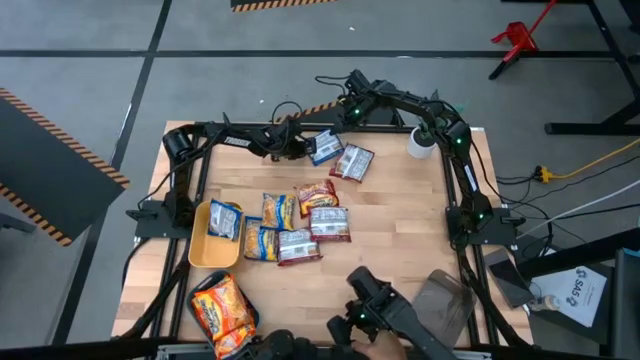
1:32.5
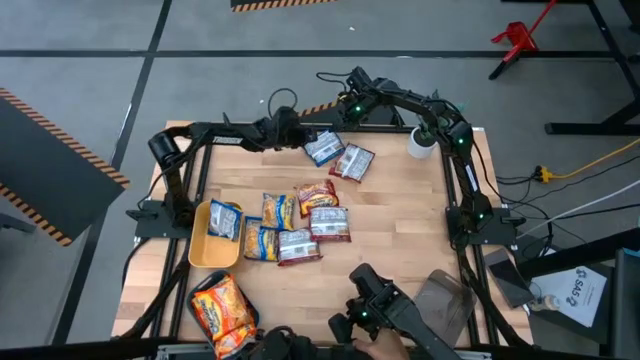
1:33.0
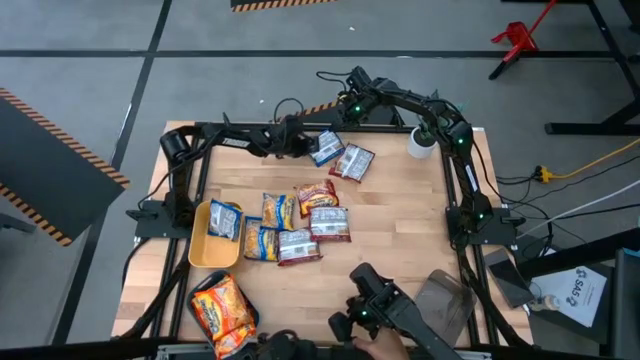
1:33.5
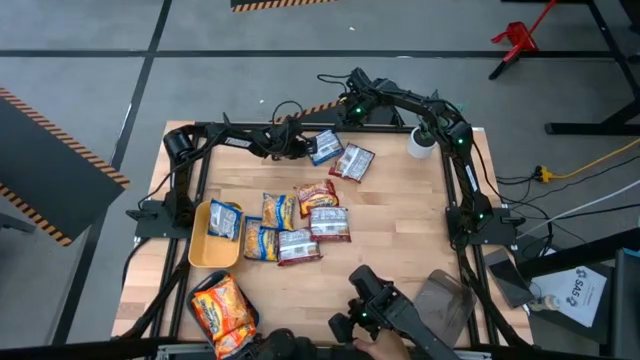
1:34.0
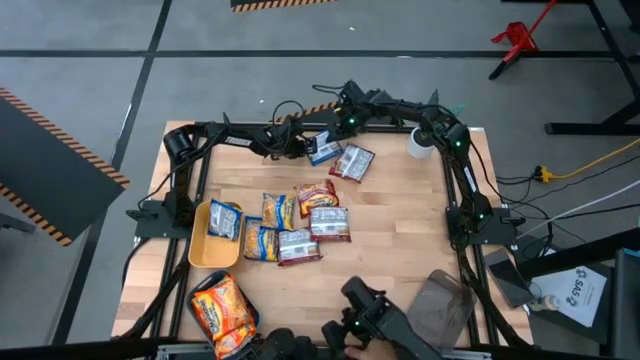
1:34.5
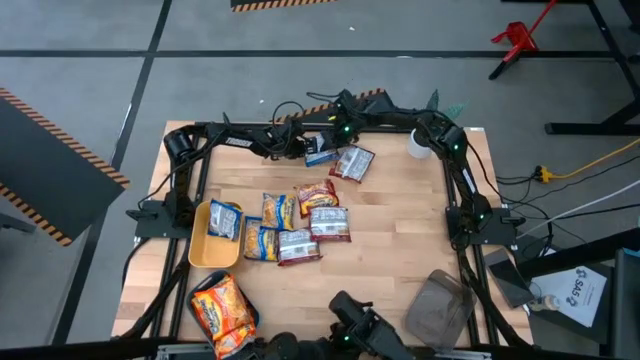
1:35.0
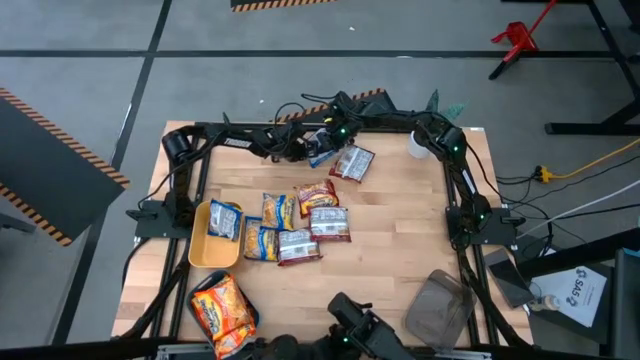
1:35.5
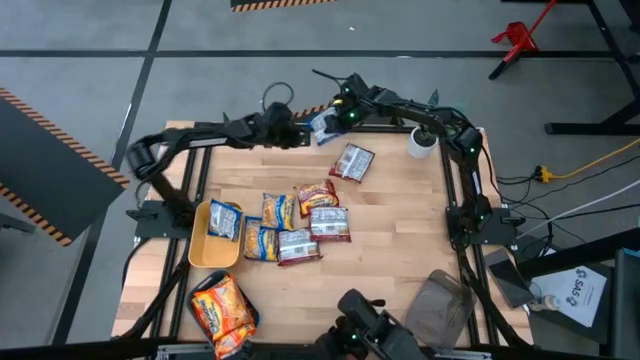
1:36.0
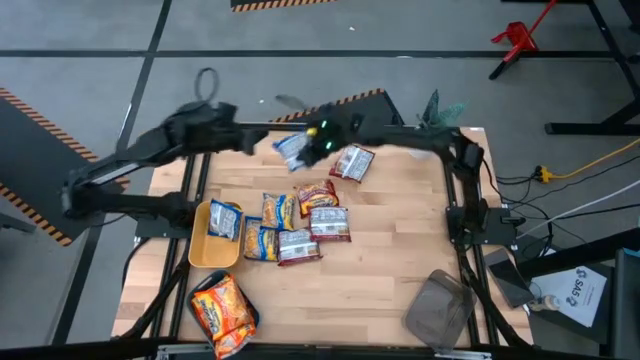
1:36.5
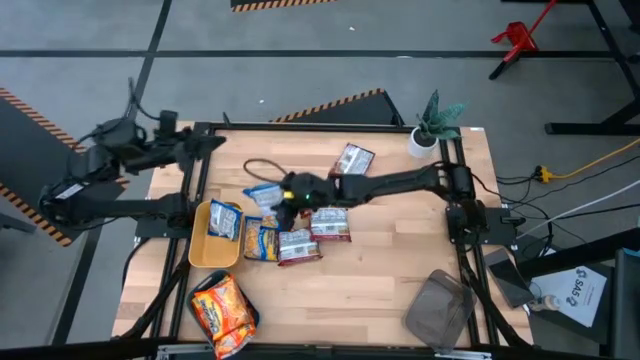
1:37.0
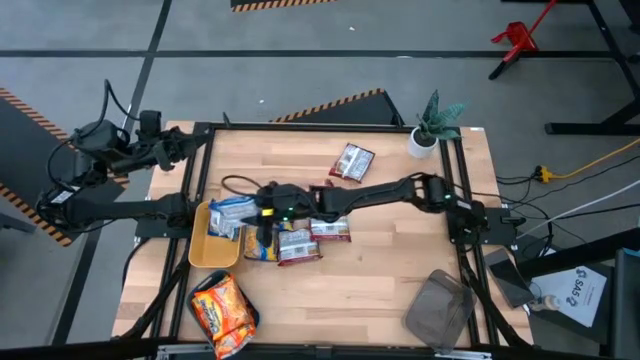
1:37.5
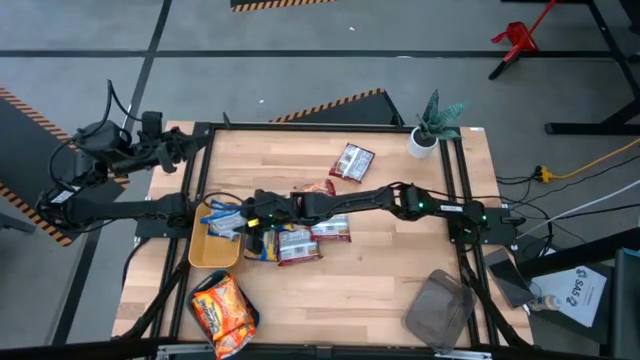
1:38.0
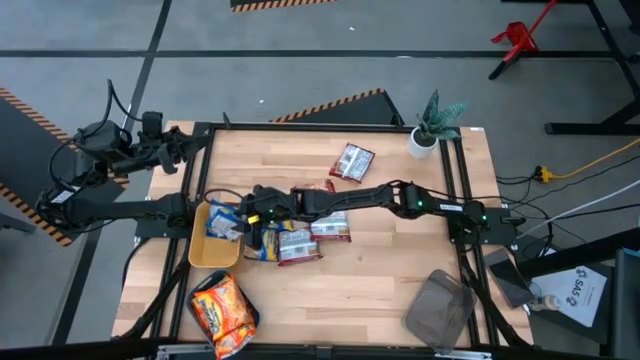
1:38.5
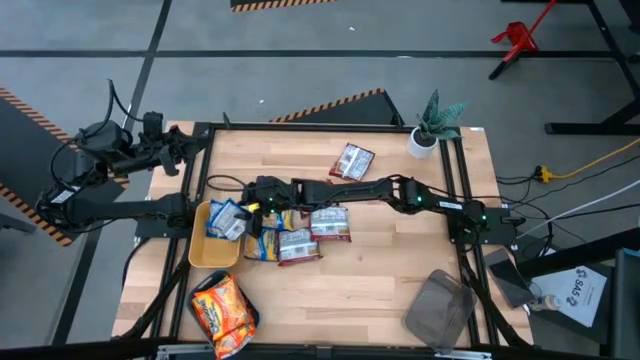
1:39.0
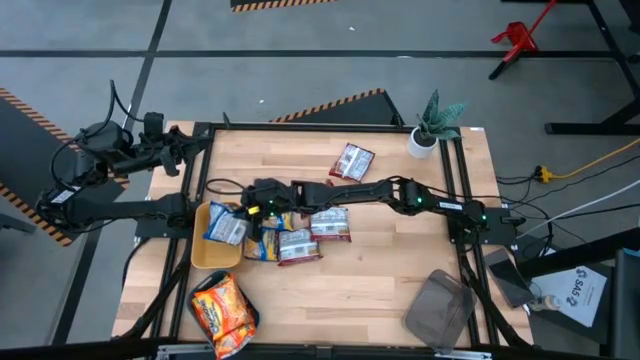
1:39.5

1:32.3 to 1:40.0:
Task: Sort Maruchan noodles
Put the blue noodle pack into the yellow bin

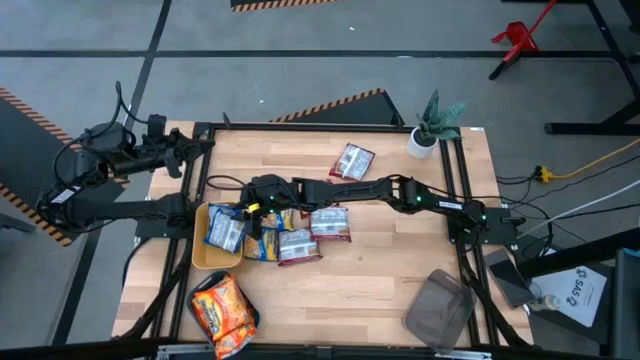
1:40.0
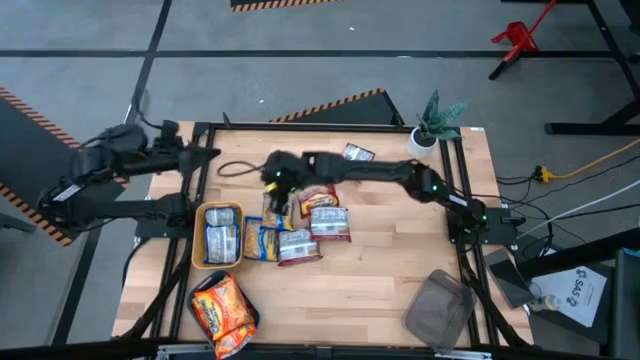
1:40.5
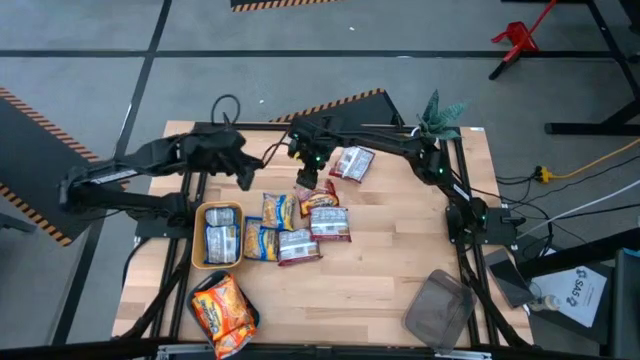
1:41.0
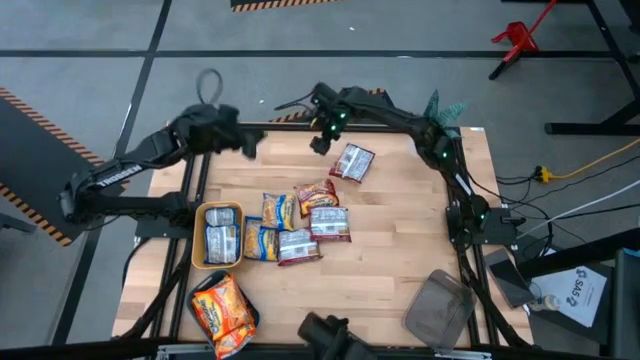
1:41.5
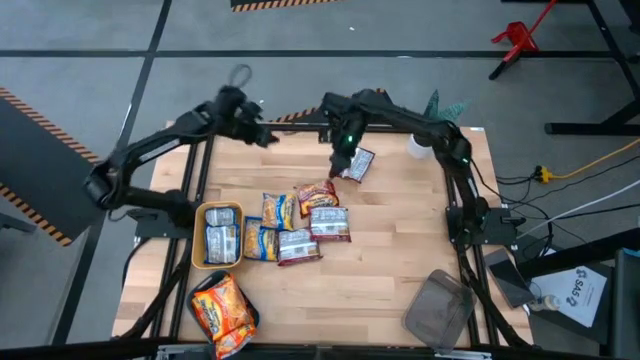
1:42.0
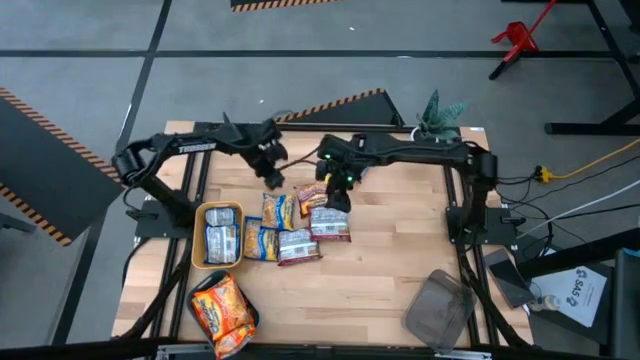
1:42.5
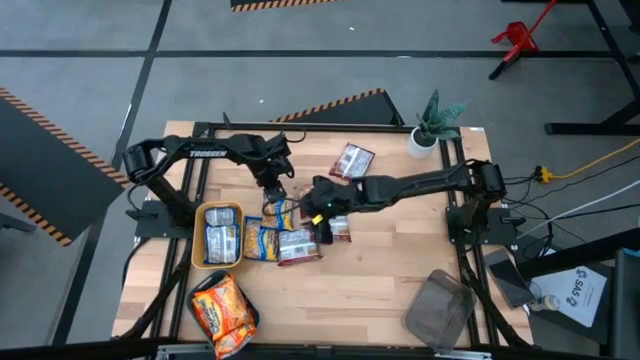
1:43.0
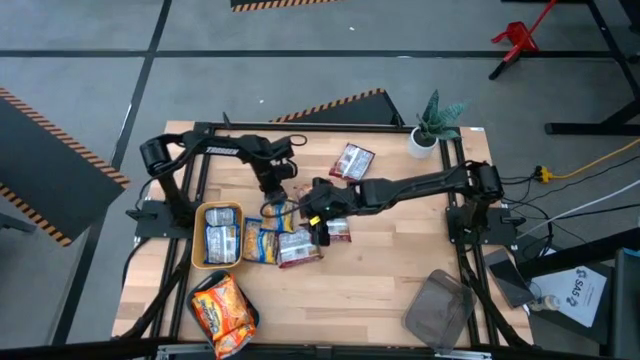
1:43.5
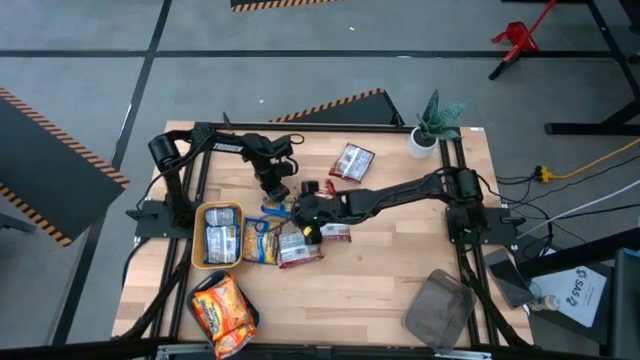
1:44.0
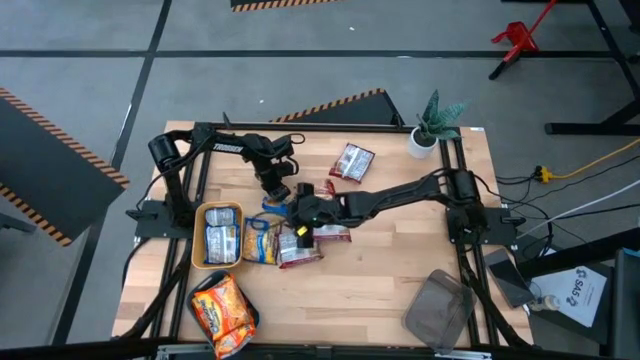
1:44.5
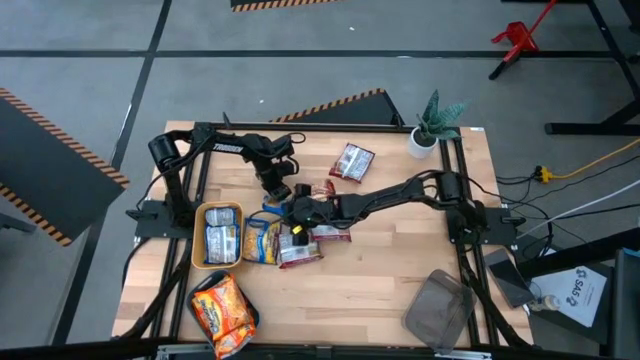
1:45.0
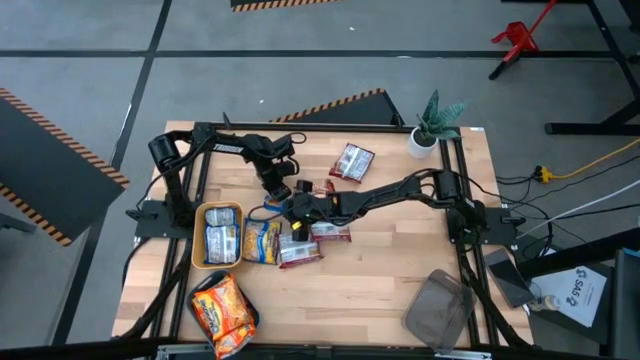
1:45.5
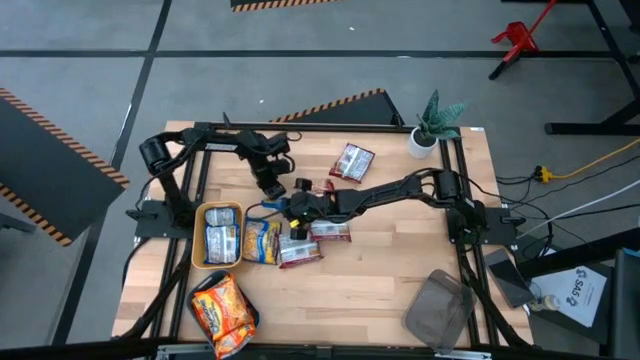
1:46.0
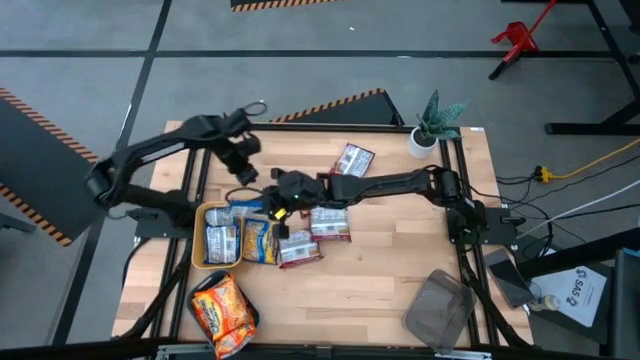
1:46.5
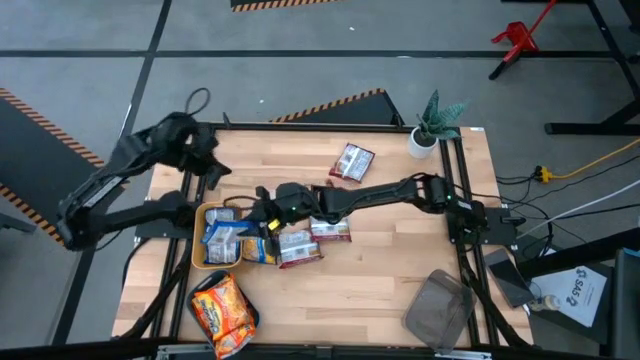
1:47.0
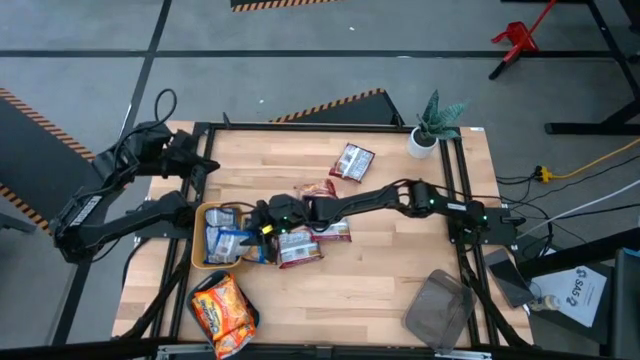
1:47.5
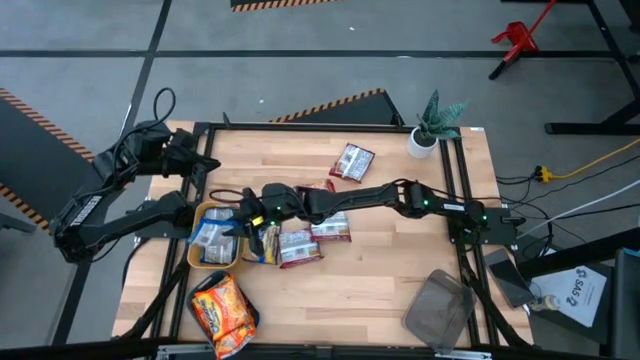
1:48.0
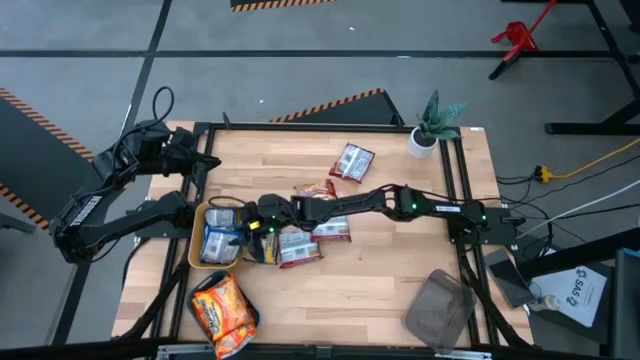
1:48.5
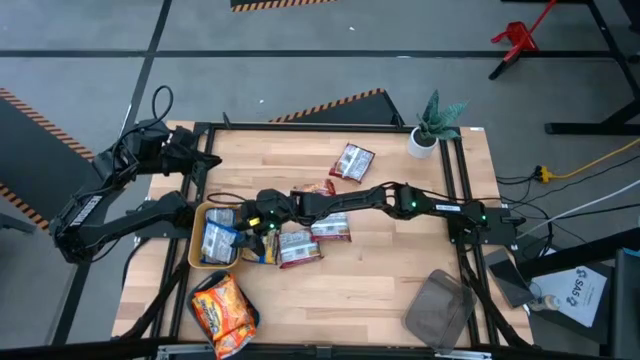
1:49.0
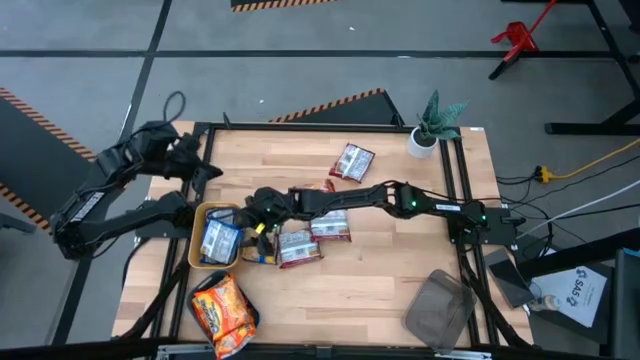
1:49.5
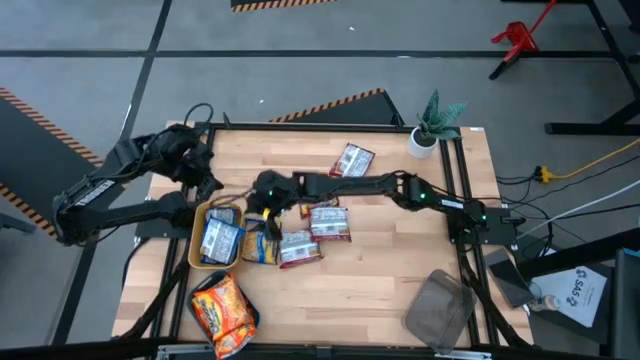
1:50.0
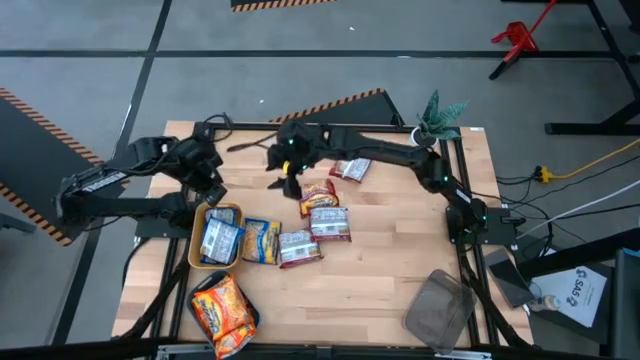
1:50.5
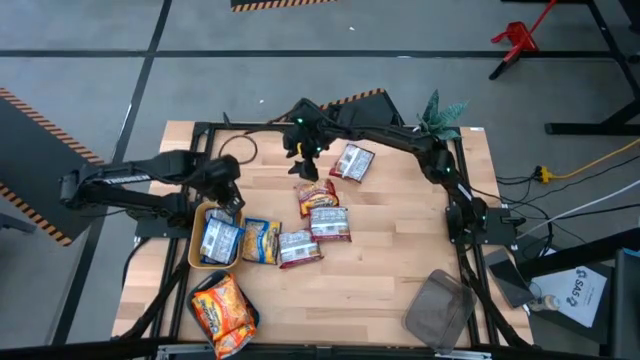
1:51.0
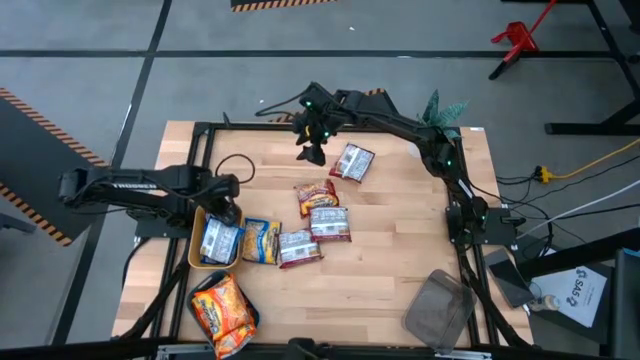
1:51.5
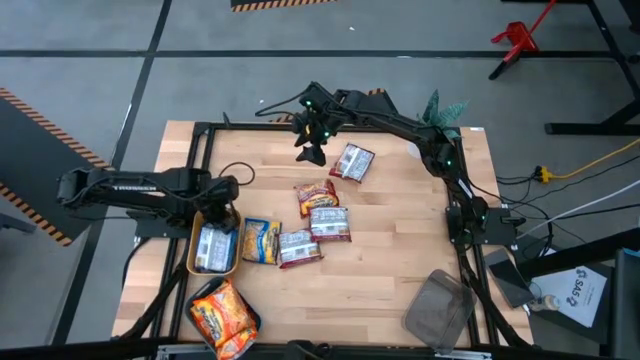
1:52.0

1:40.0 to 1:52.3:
Put the blue noodle pack into the yellow bin

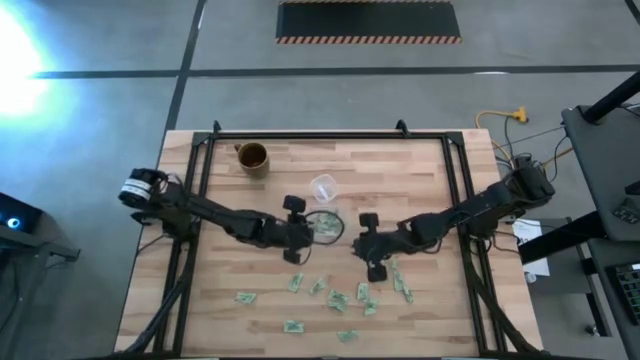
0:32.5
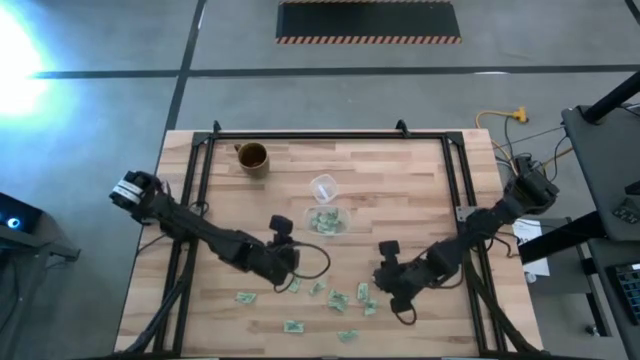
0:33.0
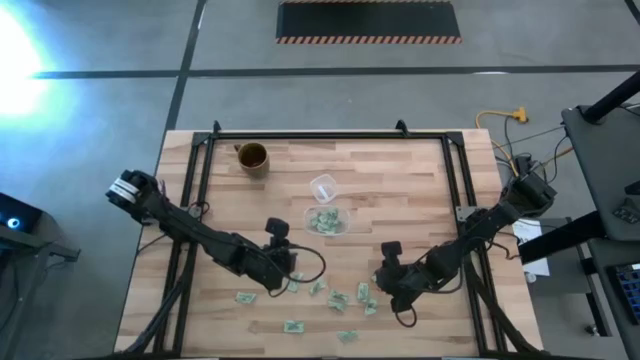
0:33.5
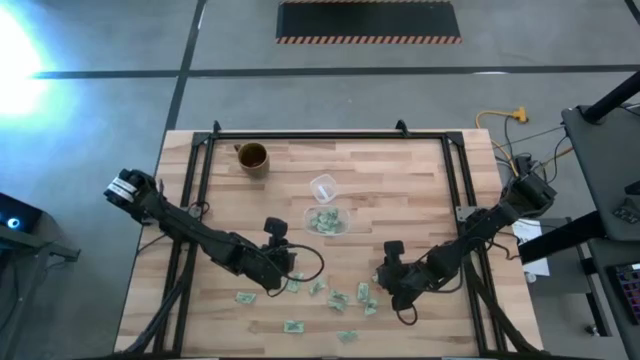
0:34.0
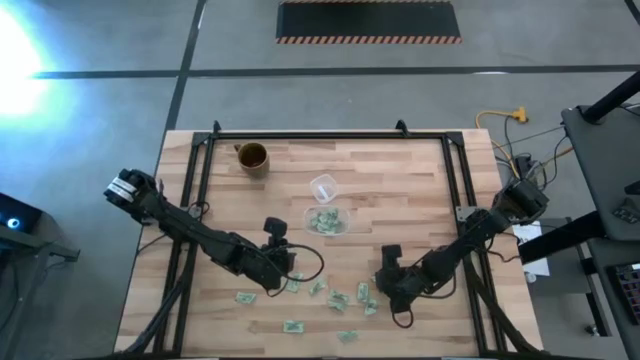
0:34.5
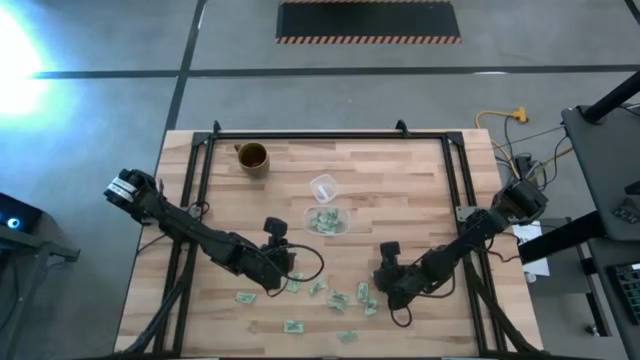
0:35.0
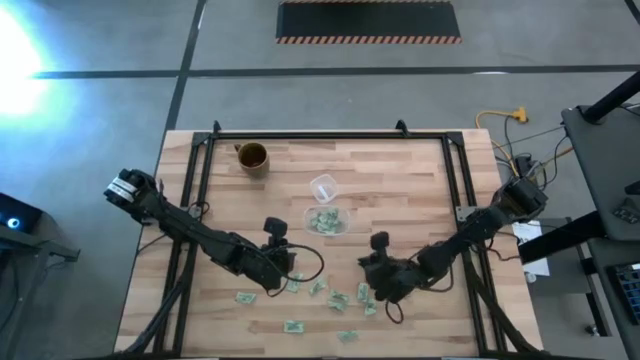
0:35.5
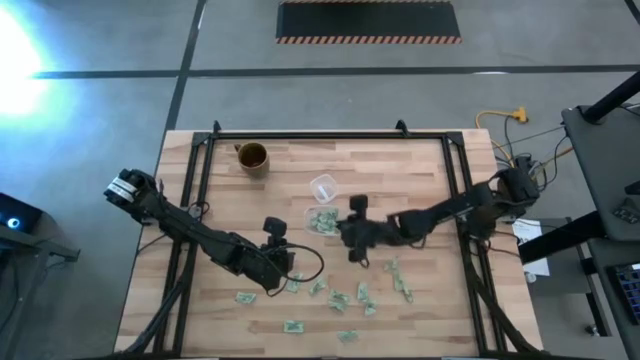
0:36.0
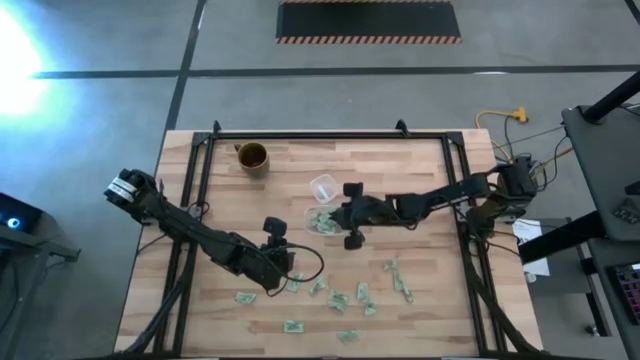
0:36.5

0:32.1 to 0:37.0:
Task: Pick and place Stevia / Truvia into bins
Put the stevia packet into the bottom transparent container
